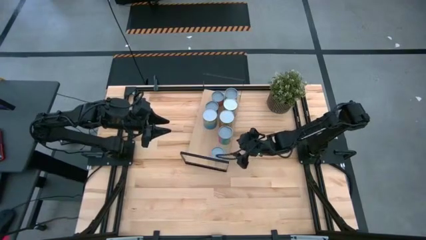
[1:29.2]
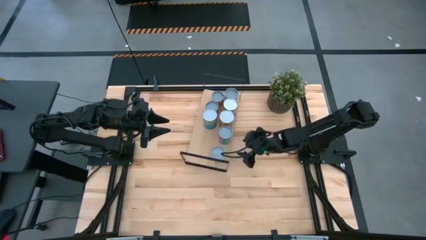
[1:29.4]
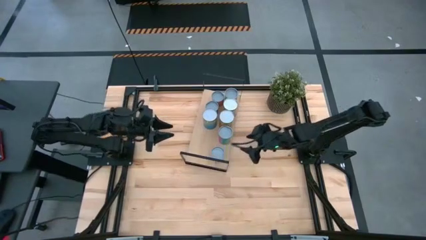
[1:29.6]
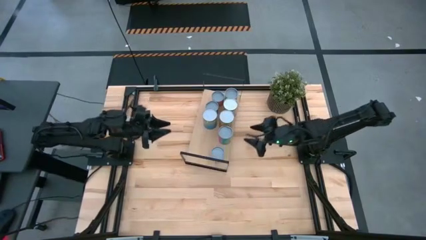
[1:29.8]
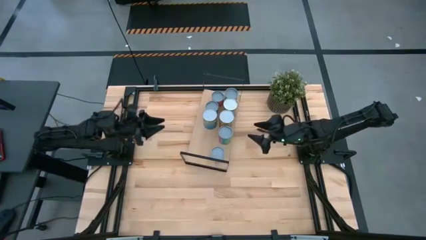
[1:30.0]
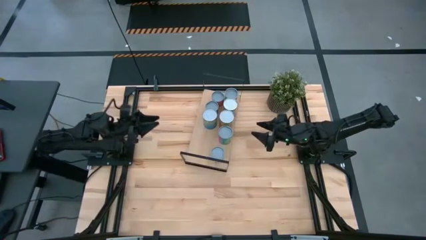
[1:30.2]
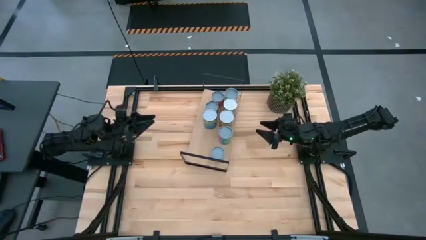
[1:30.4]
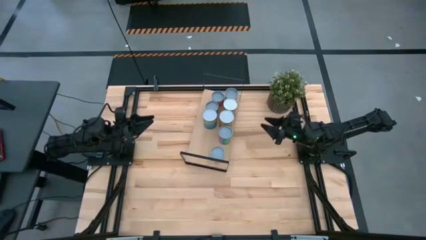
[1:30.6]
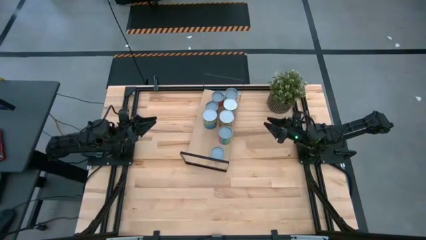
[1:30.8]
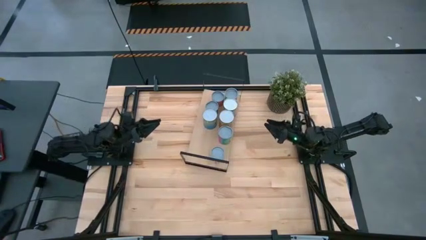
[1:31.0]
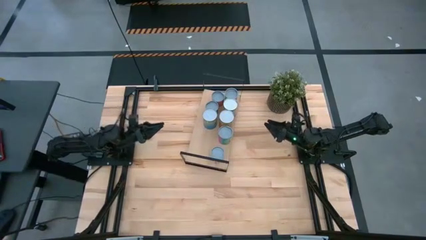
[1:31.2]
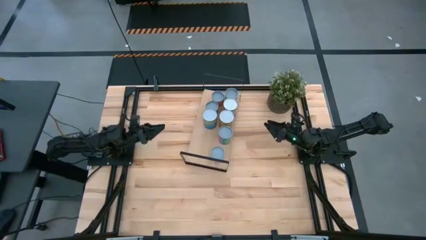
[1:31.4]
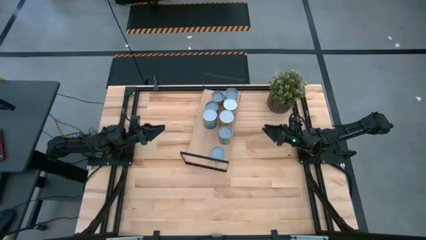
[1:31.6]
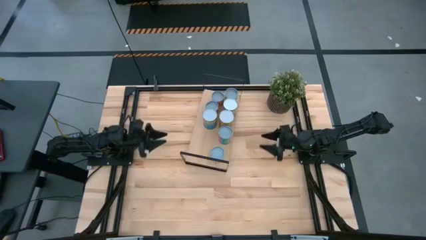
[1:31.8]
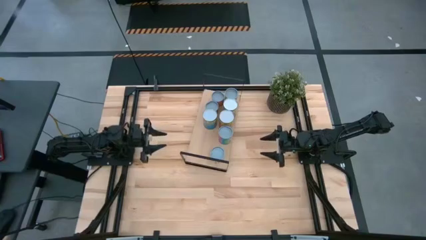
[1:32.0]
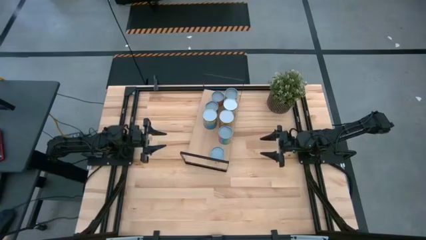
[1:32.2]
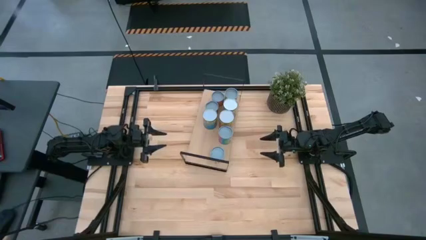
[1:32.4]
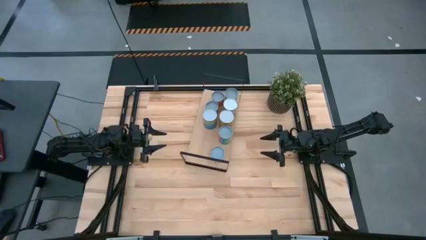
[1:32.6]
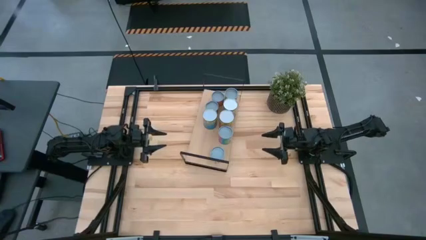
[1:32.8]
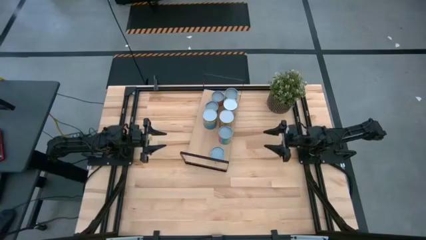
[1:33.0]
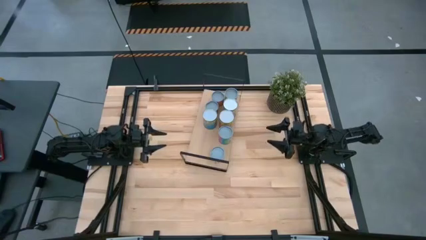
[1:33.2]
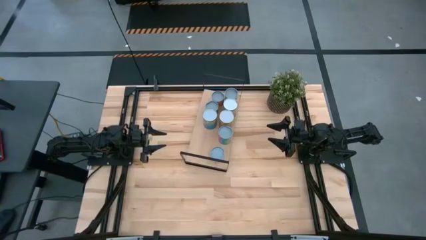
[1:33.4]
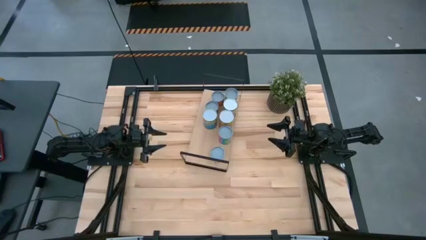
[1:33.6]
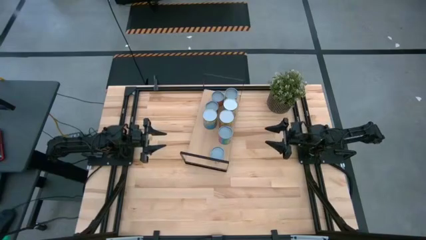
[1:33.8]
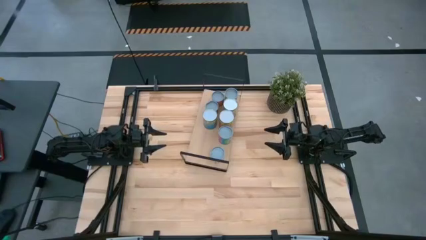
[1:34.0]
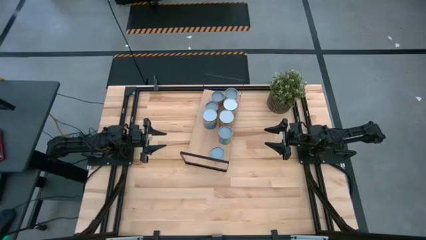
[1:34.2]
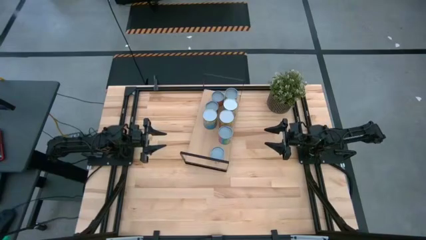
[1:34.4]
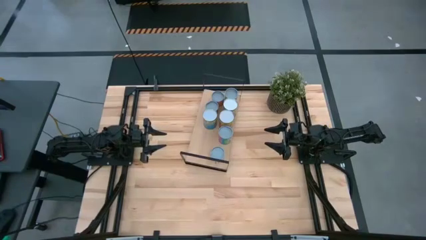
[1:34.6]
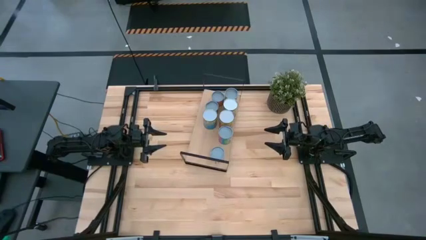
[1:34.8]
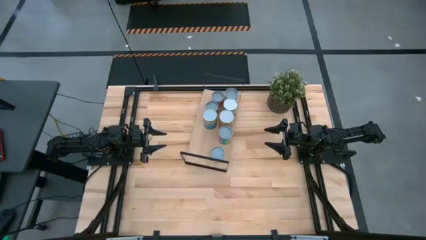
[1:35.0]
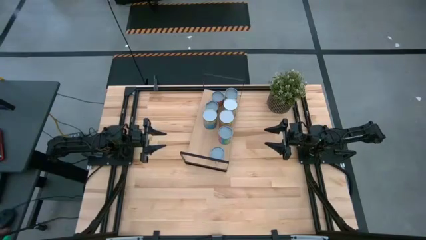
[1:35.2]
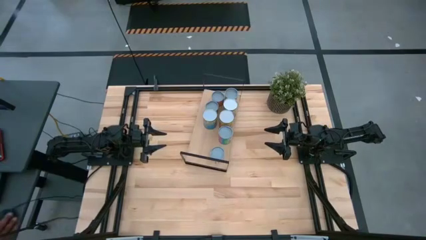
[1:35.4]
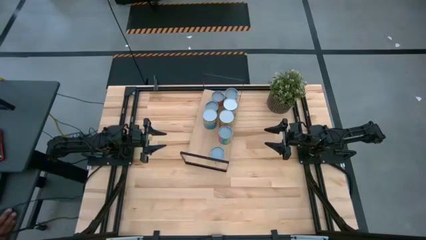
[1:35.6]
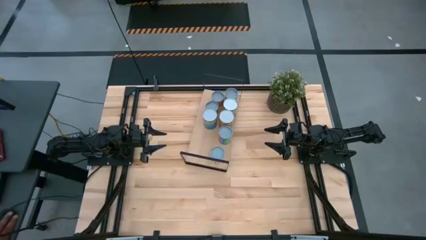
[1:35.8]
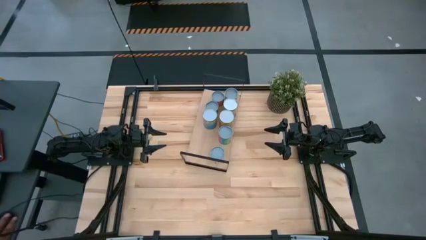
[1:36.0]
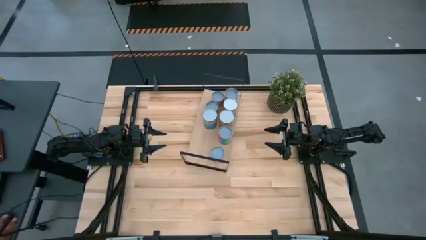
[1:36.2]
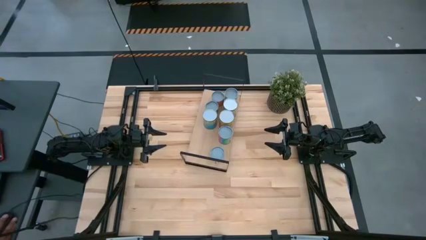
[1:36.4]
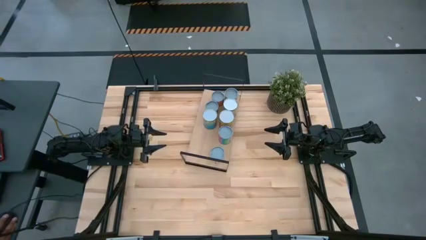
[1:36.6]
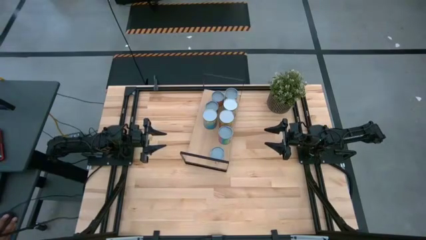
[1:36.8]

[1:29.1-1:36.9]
Task: Pick and place cans onto a shelf
Return to Home Position

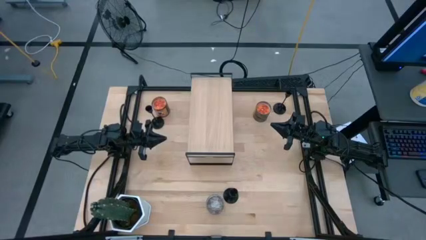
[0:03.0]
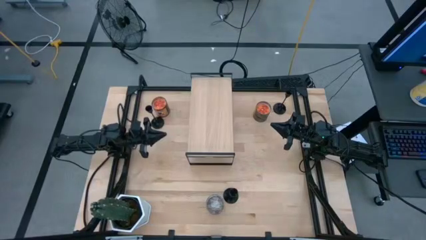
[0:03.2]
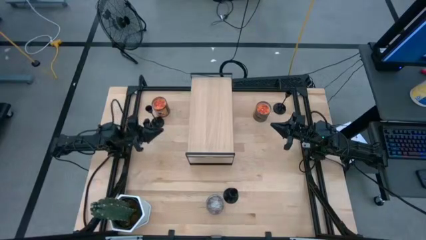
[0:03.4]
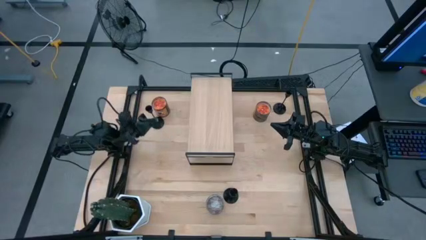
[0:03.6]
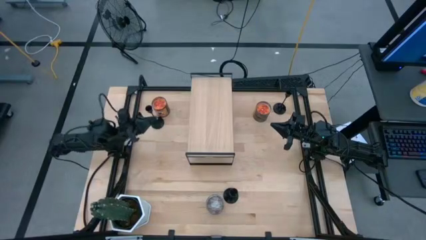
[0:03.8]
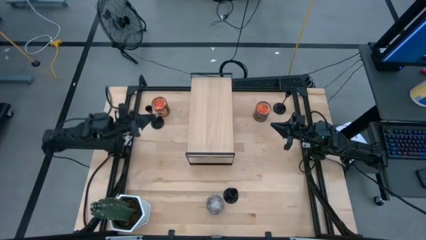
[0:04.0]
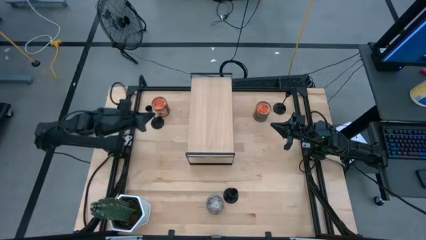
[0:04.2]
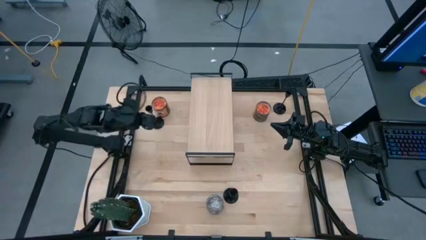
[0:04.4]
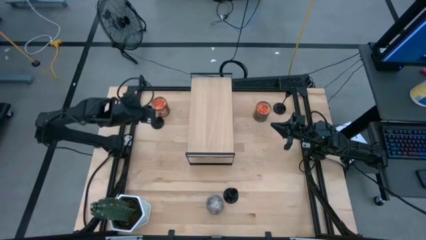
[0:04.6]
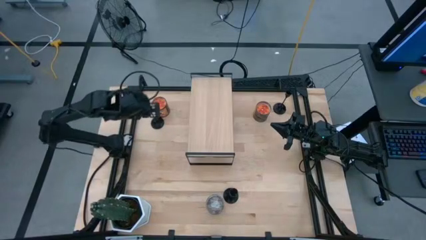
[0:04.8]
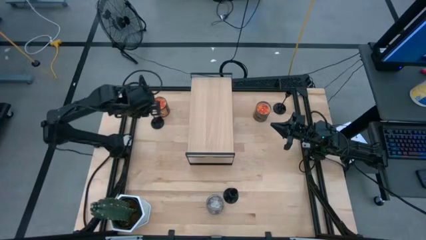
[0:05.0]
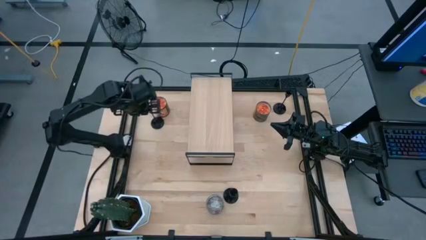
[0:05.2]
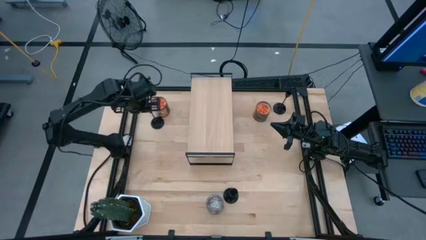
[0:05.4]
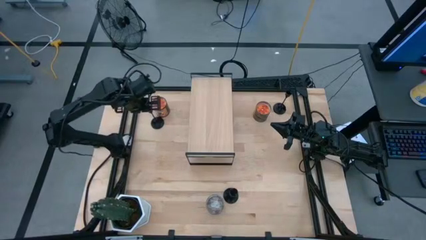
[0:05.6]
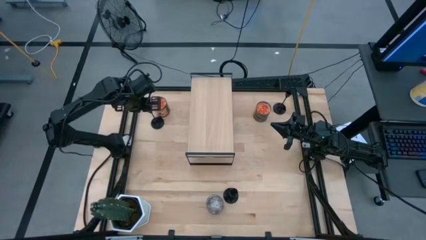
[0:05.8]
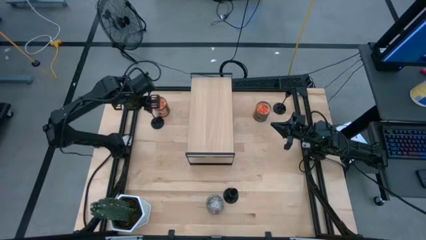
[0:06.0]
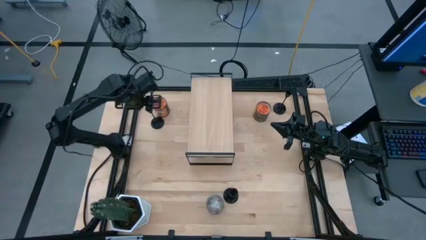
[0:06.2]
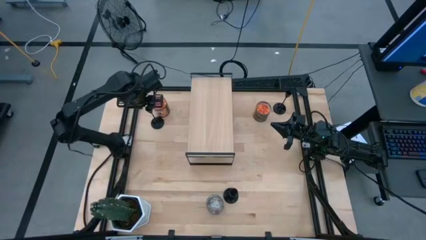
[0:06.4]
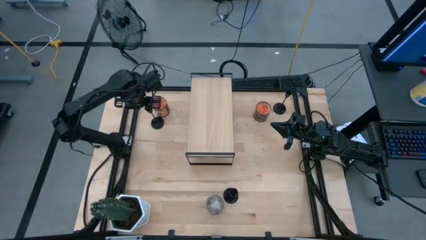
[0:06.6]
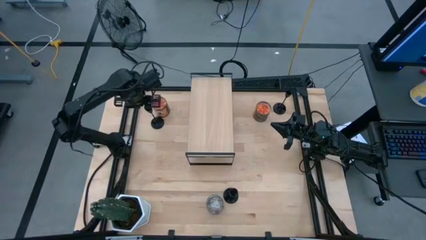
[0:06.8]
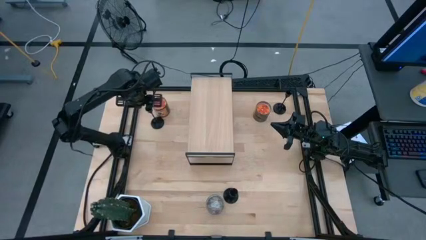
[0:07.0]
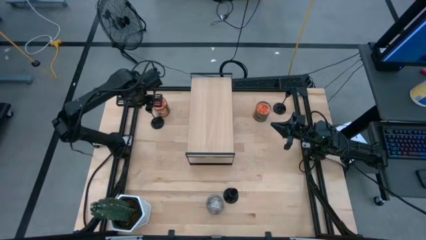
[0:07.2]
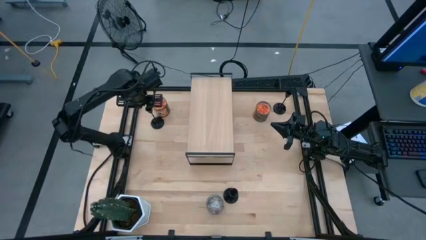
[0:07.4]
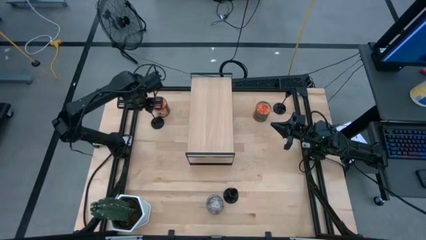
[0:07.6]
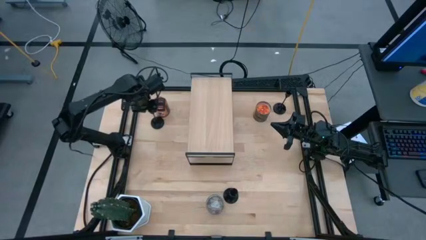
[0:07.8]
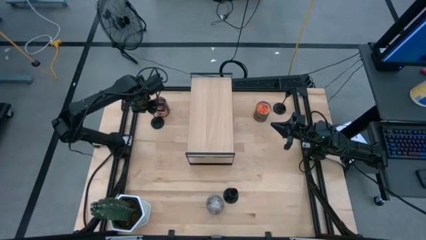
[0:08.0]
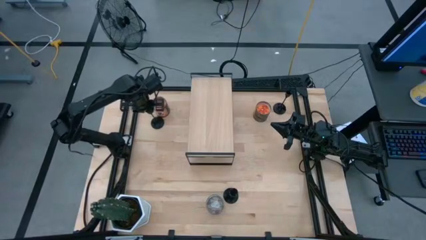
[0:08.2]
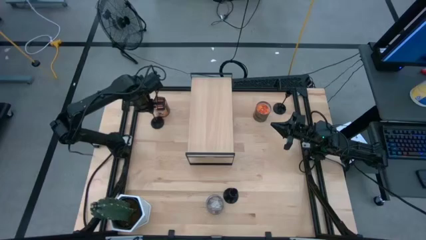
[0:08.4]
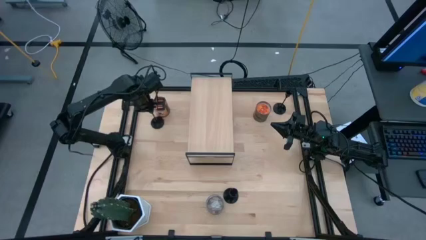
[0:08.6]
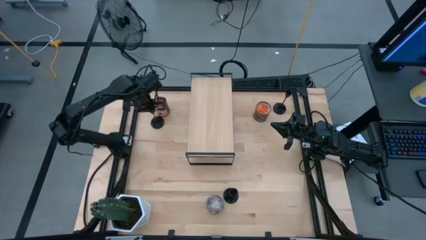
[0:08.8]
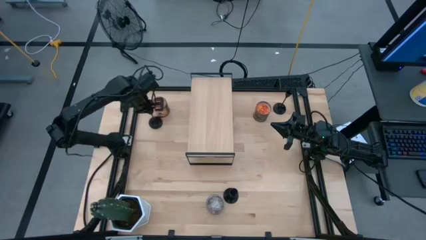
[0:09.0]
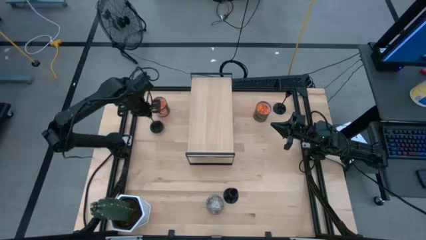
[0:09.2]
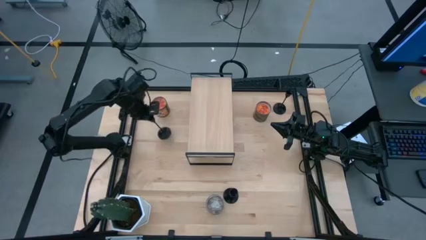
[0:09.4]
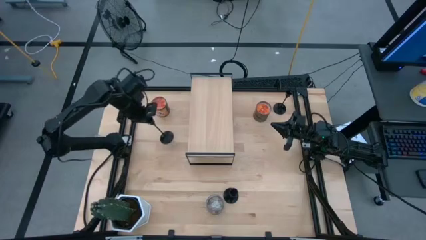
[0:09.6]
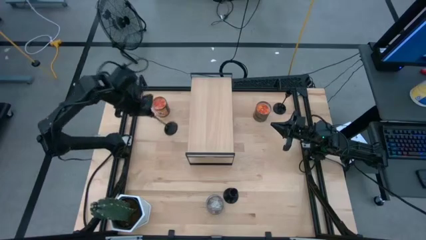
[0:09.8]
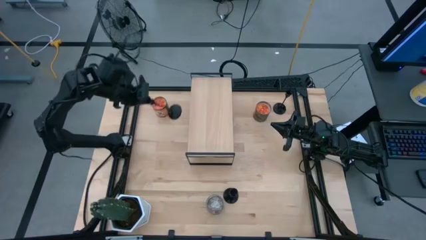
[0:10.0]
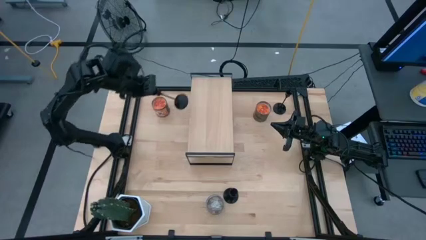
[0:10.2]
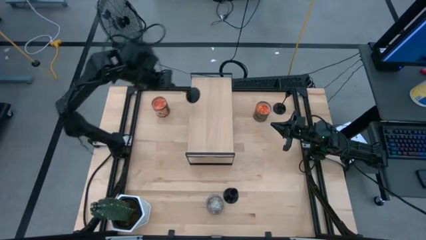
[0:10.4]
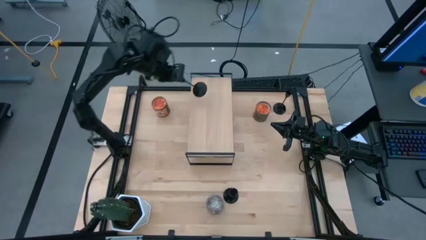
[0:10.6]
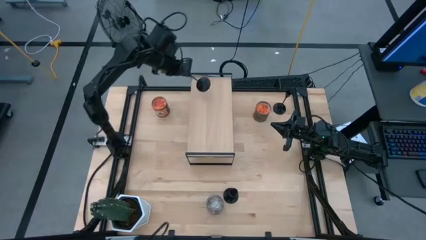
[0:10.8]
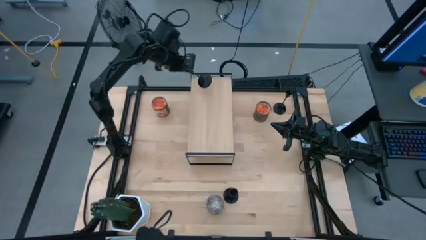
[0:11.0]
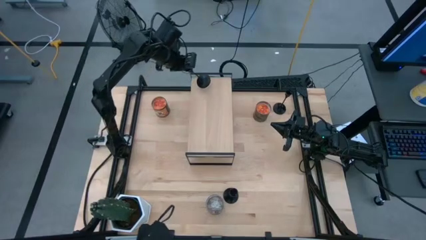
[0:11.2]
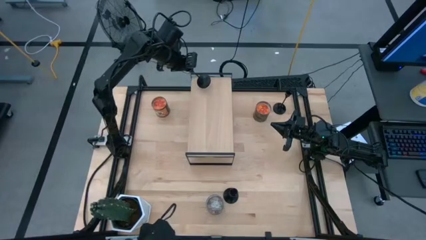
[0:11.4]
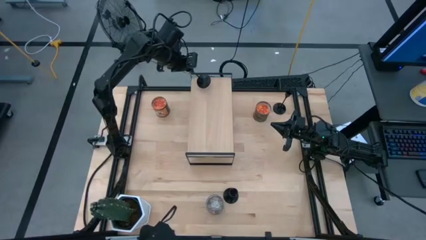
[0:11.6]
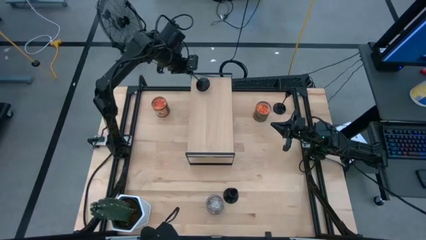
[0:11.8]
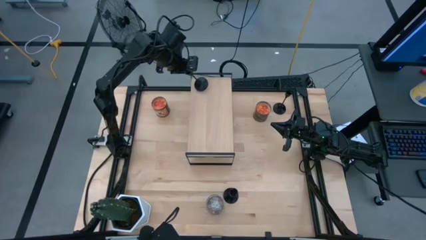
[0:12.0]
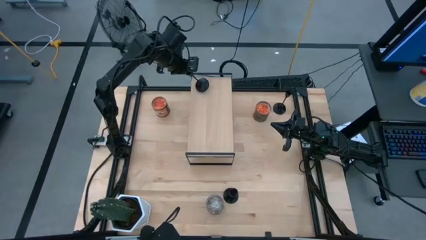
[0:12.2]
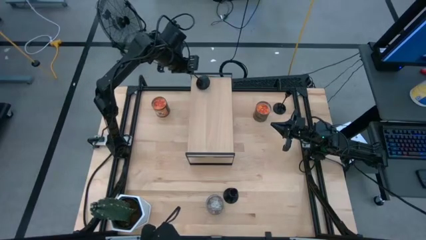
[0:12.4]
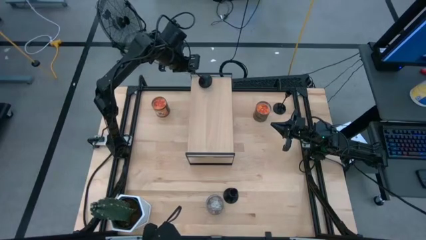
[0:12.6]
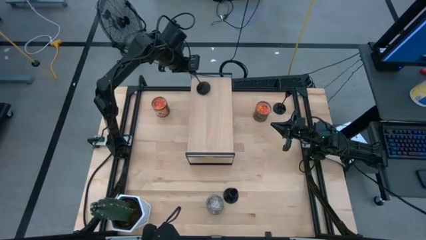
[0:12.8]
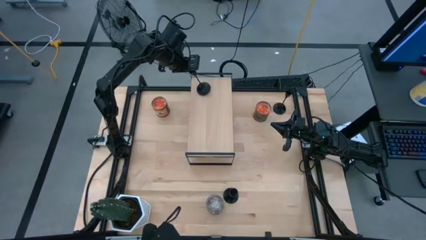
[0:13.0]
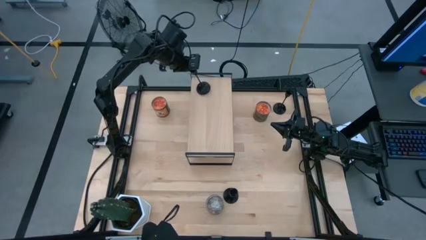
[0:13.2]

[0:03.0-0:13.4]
Task: Pick & Place candle stick holders
Put the top left black candle holder on the shelf
